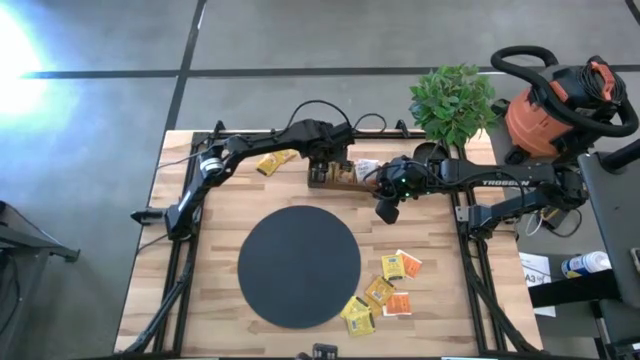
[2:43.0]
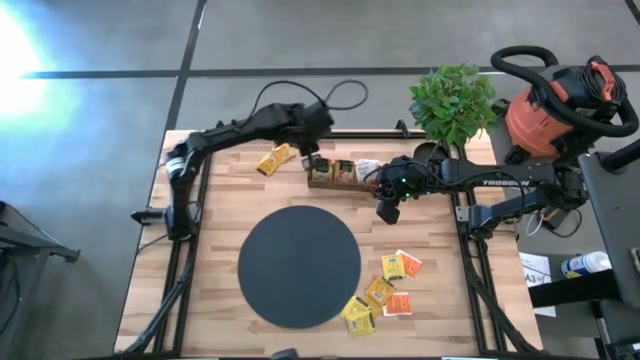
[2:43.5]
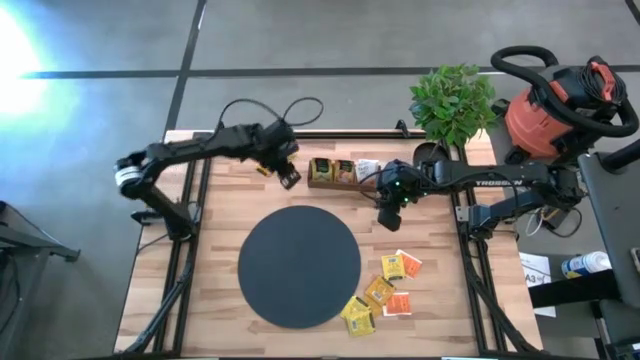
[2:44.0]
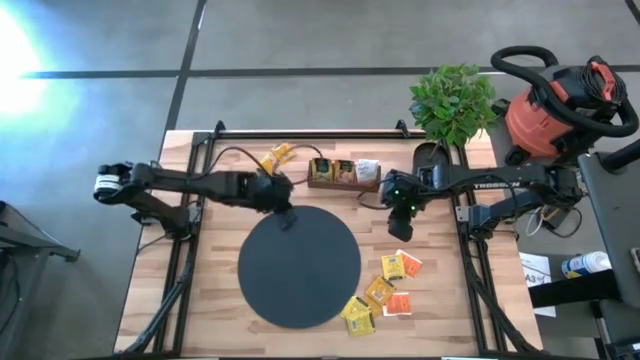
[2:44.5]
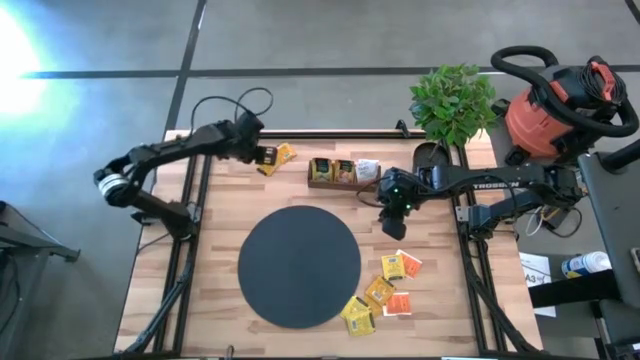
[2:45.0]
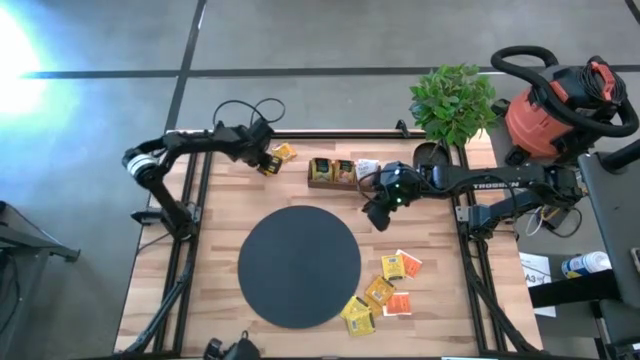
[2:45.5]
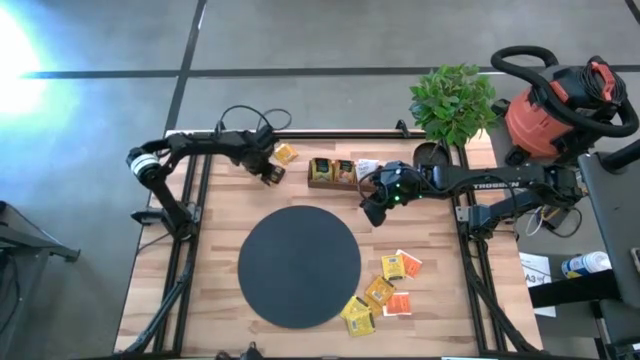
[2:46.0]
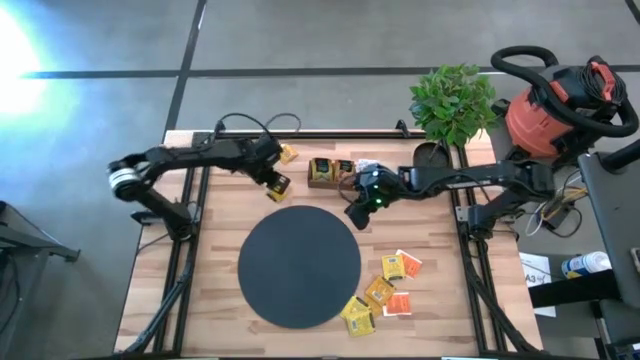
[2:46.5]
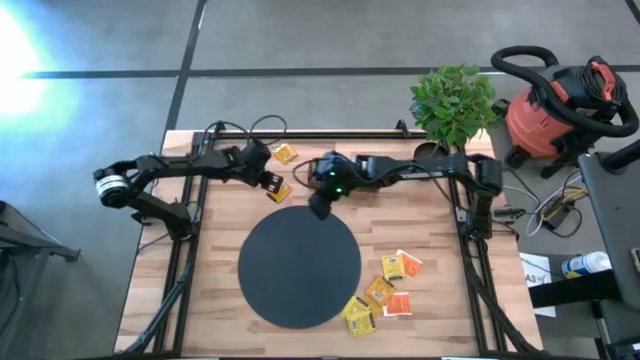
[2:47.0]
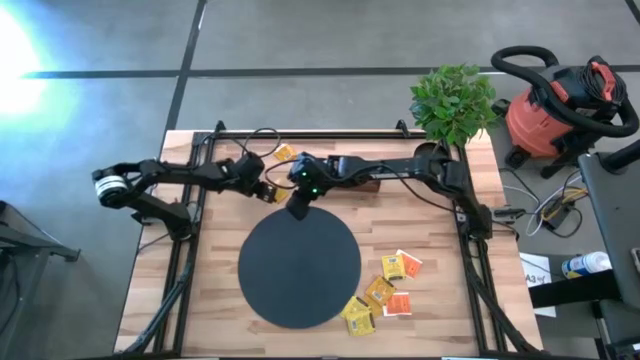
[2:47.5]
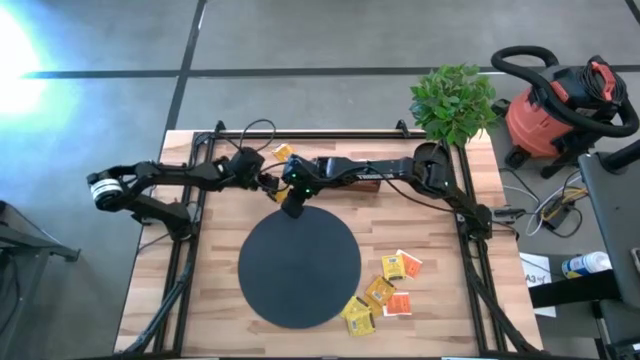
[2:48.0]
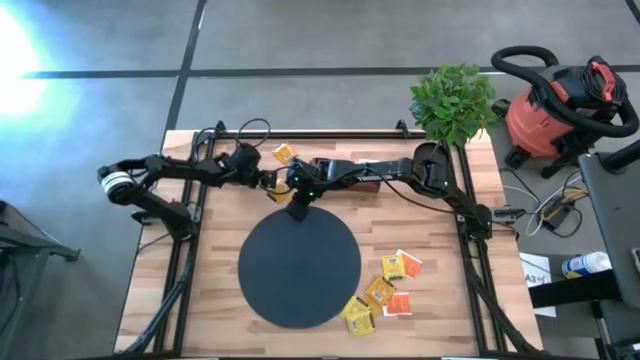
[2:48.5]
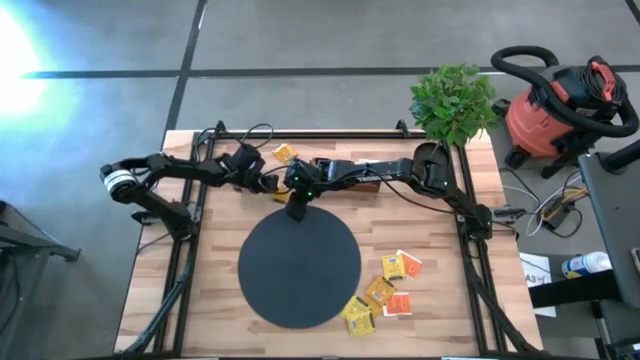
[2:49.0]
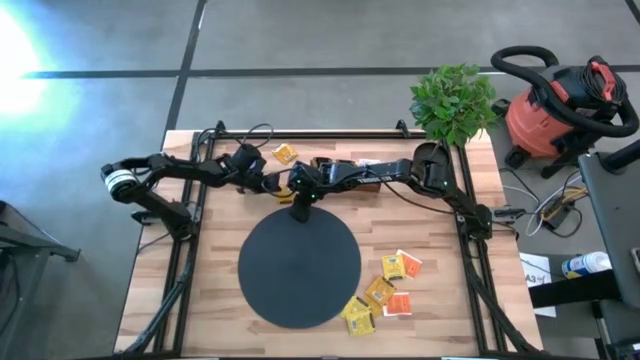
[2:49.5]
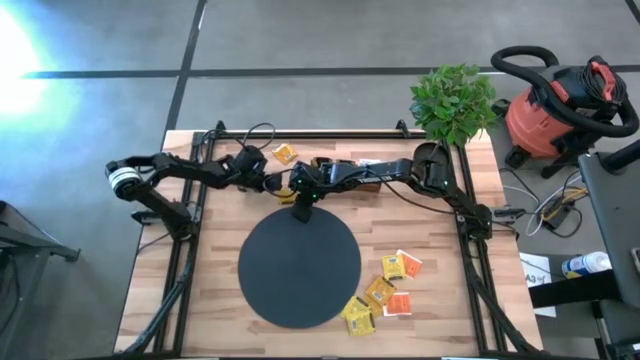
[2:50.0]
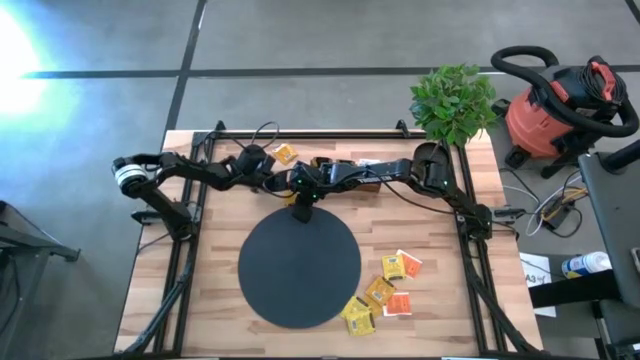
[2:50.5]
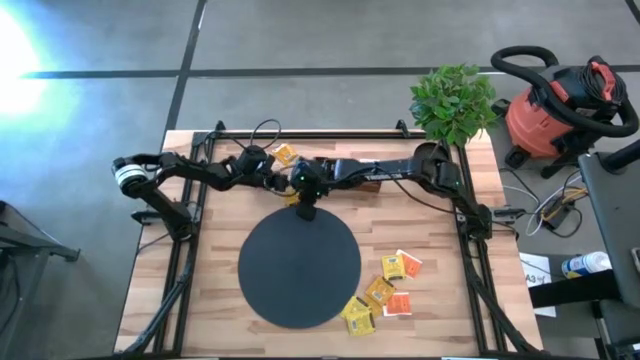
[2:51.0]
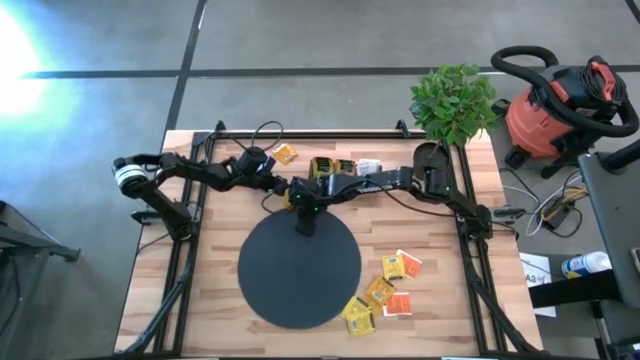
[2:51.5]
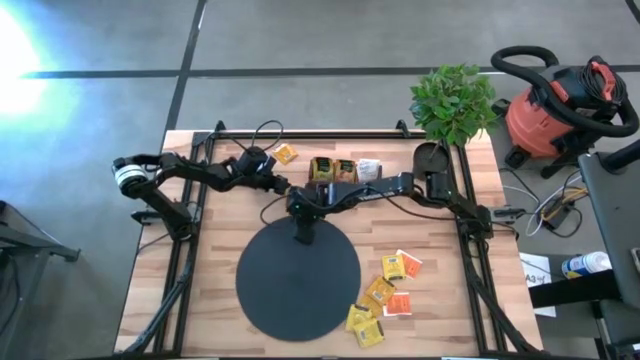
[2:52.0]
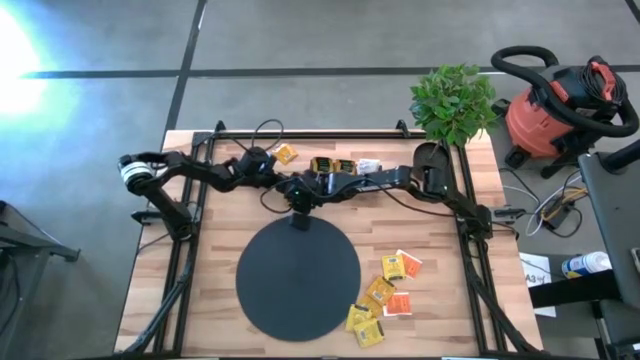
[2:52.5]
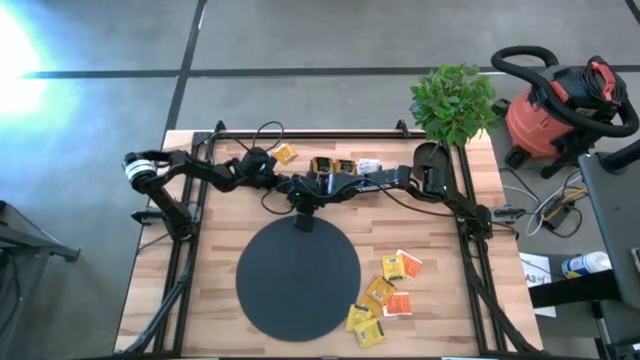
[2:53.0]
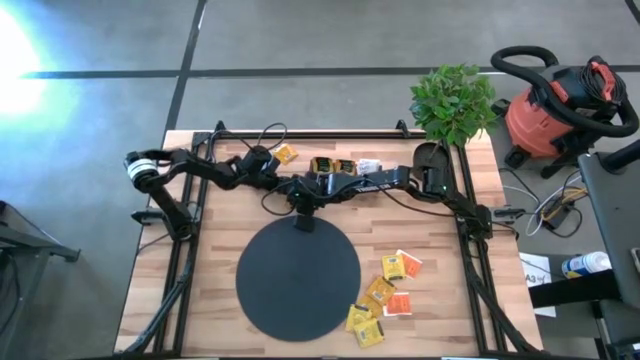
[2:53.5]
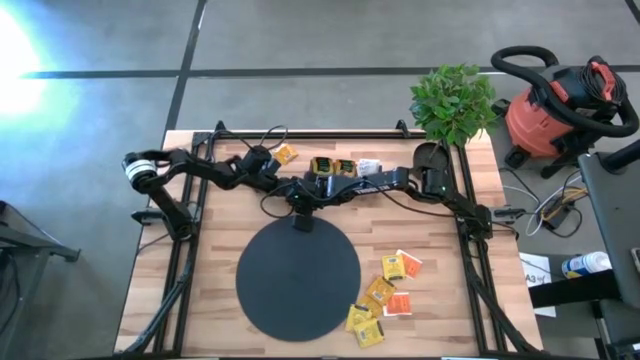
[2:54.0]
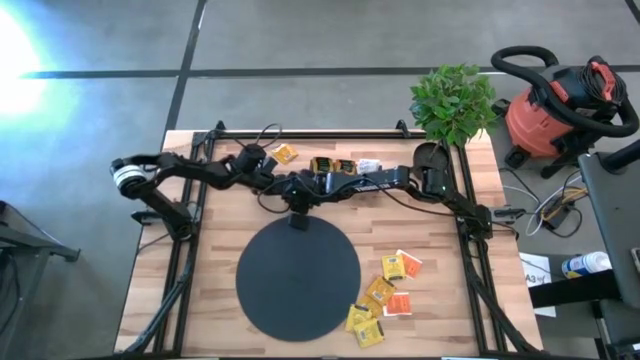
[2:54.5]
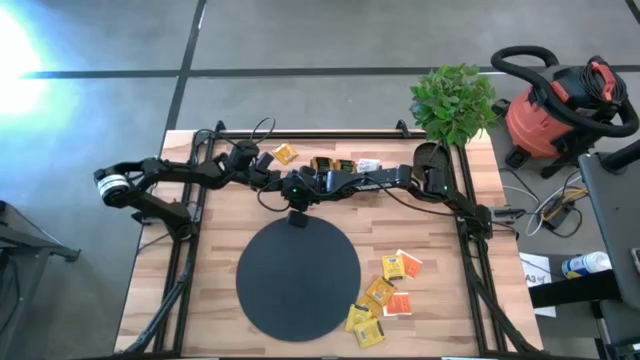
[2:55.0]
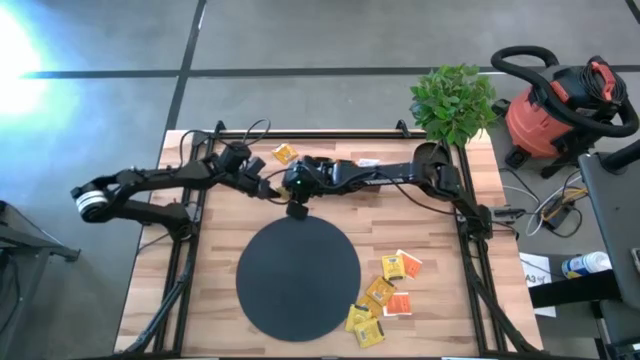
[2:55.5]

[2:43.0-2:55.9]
Task: Pick & Place Tea
Put the orange tea bag into the middle section of the wooden organizer

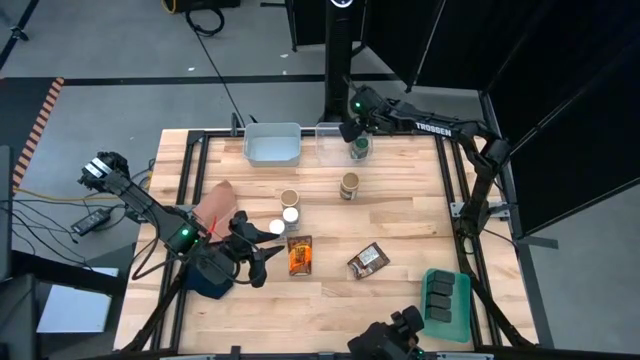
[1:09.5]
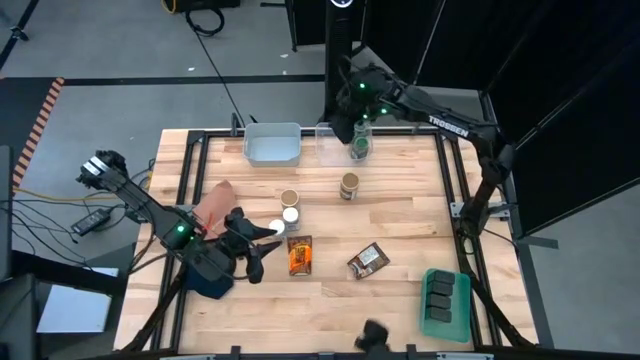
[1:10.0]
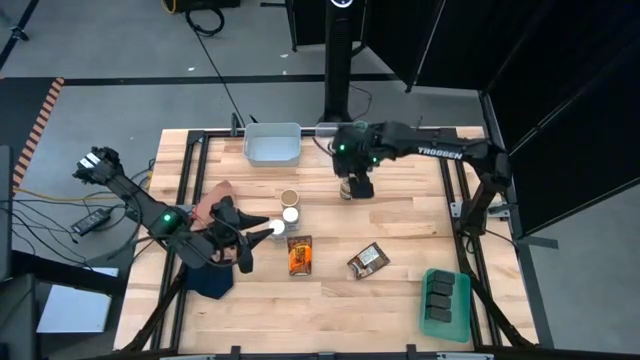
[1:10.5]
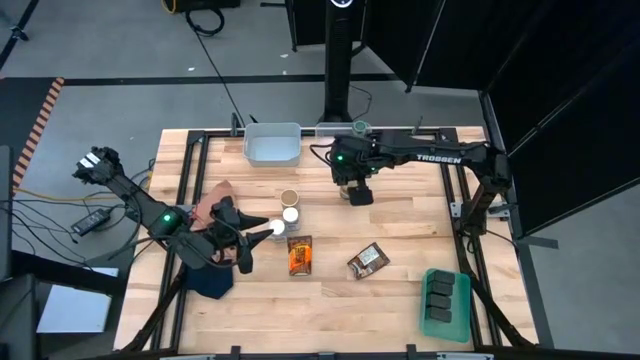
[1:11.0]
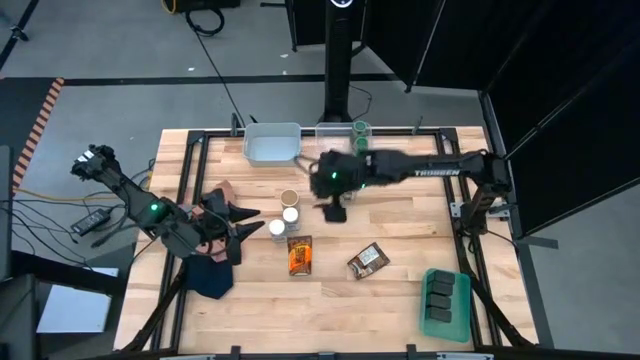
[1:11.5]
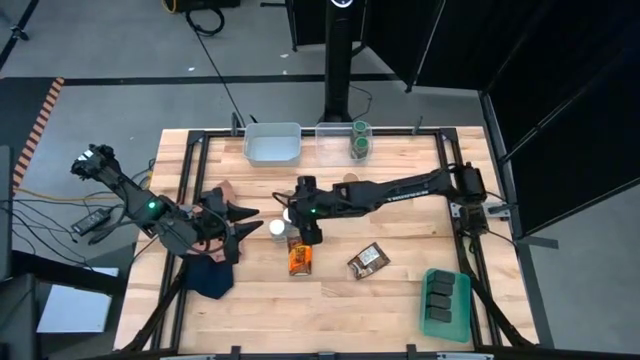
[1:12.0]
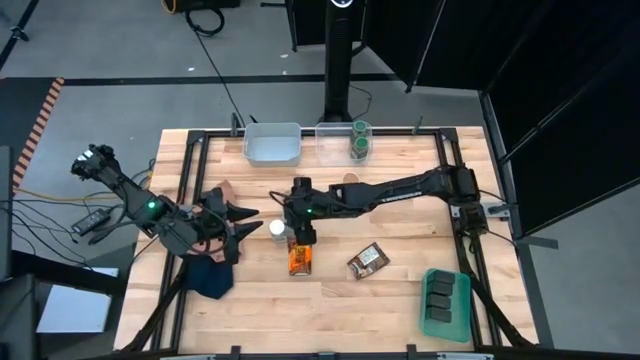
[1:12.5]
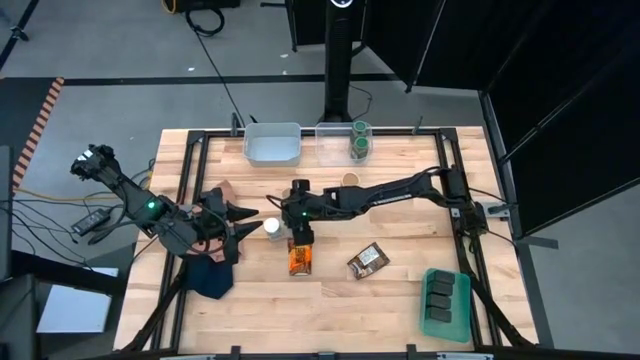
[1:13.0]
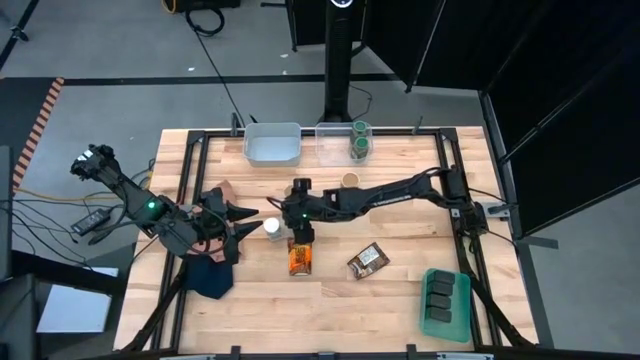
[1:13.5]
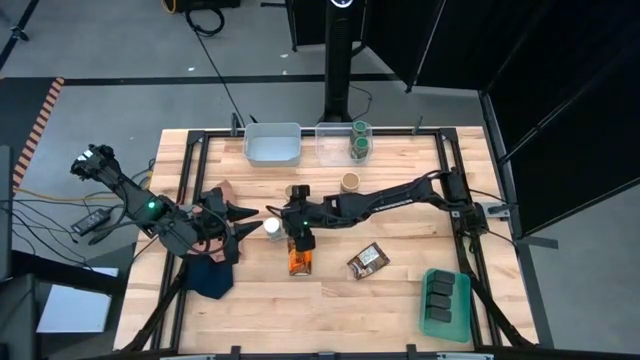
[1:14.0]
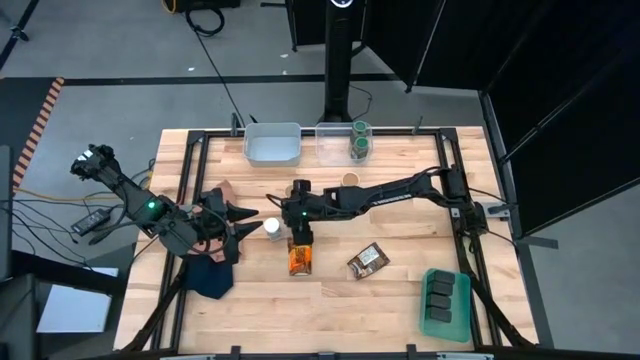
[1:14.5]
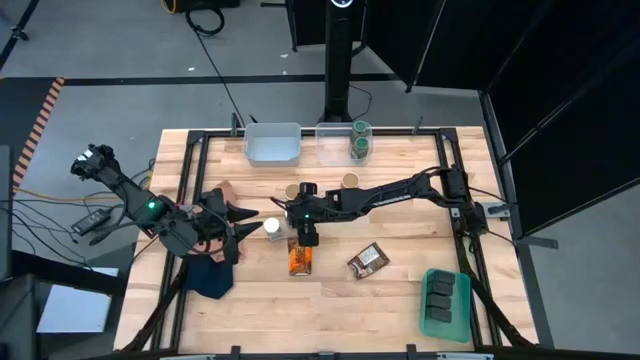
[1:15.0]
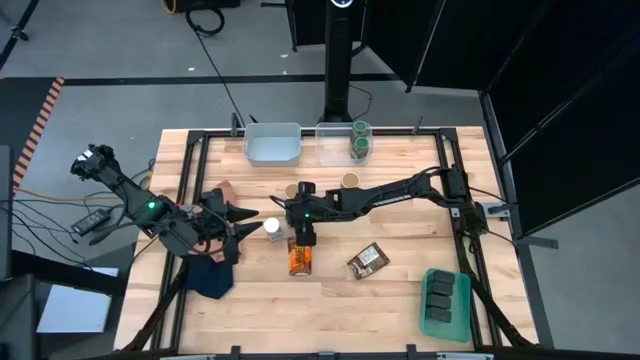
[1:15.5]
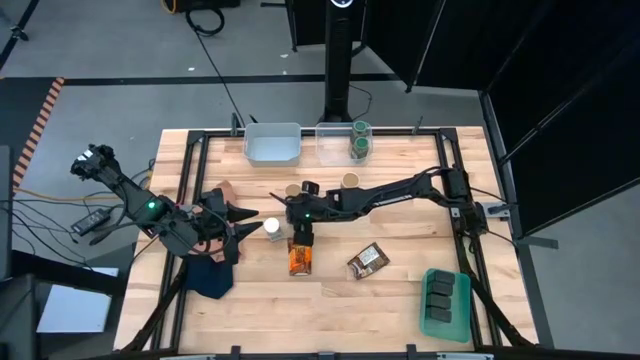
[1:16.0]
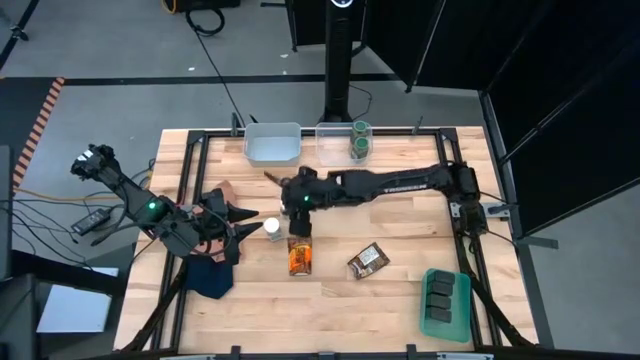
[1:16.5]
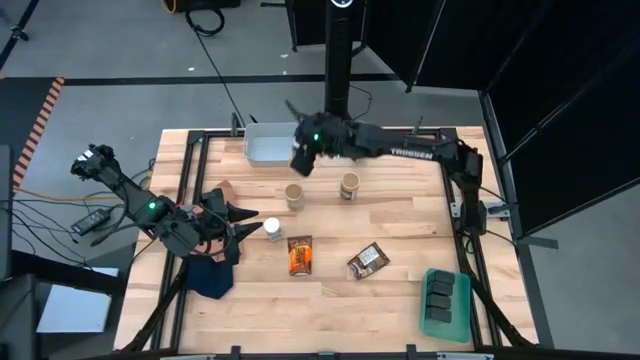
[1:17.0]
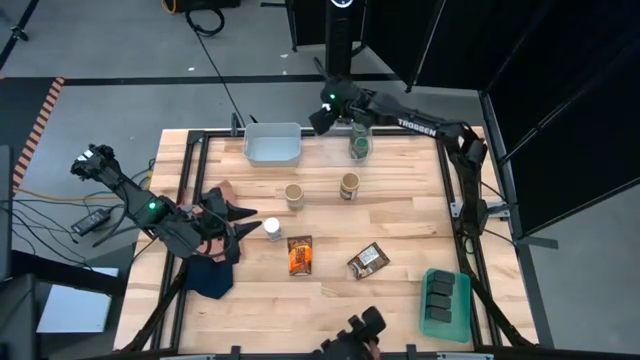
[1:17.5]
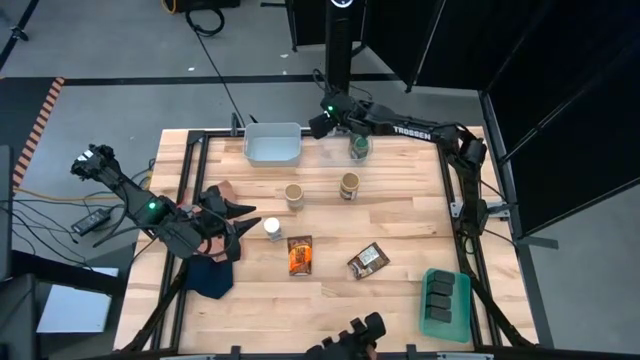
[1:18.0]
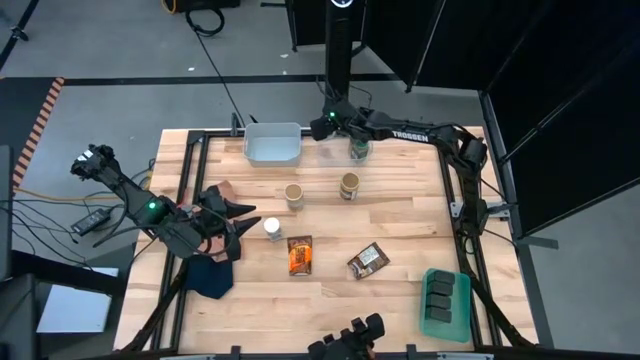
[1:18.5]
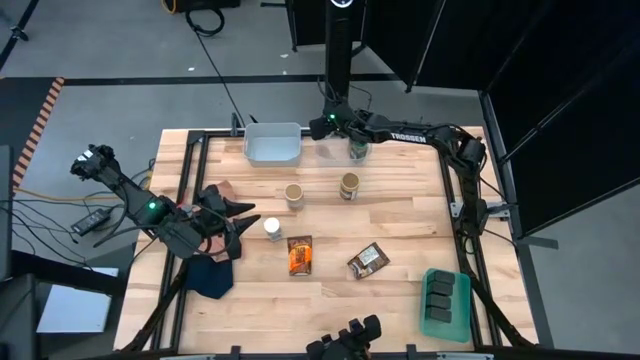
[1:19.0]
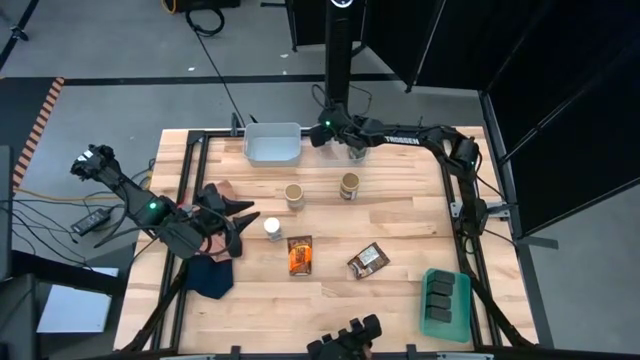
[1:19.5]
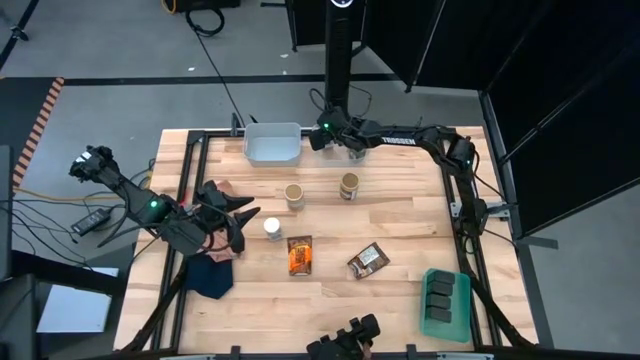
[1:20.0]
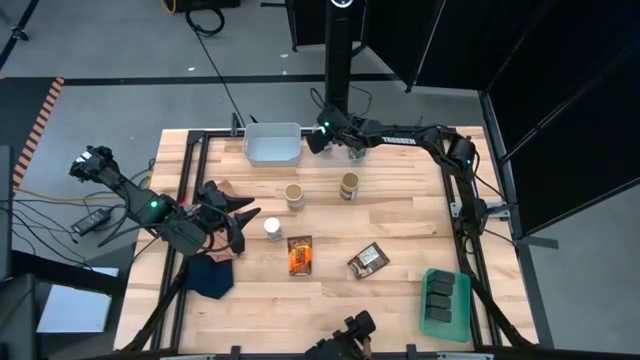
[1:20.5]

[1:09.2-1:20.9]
Task: Sort spices by type
Put the right white seasoning bottle into the transparent bin
